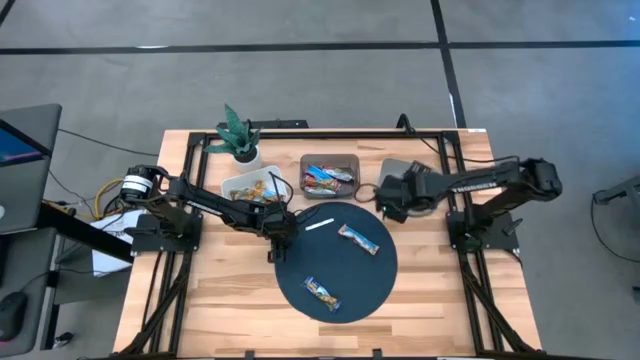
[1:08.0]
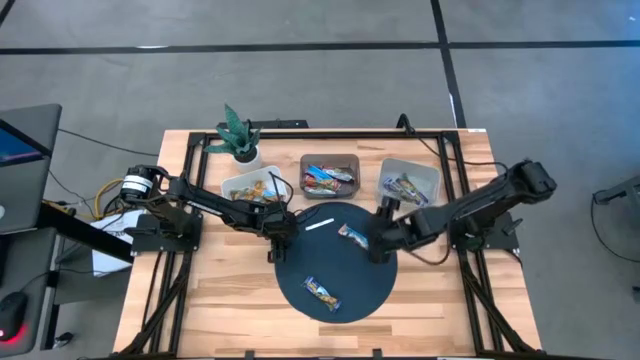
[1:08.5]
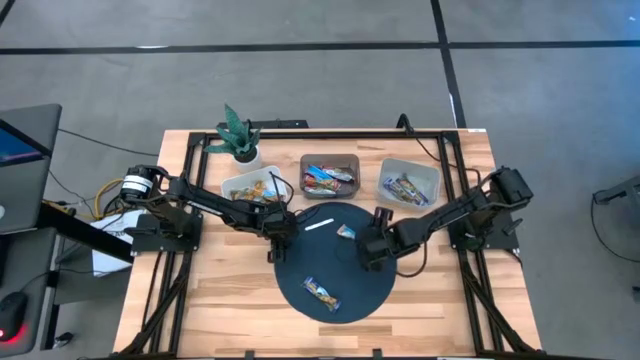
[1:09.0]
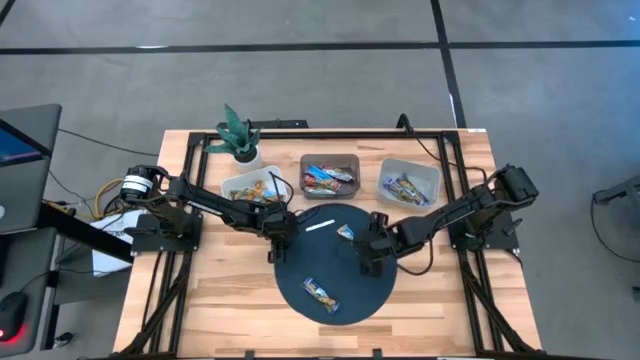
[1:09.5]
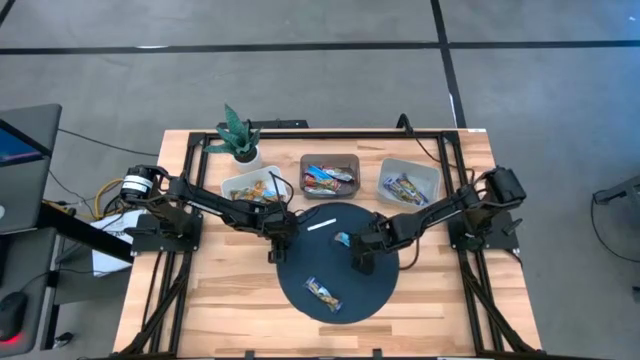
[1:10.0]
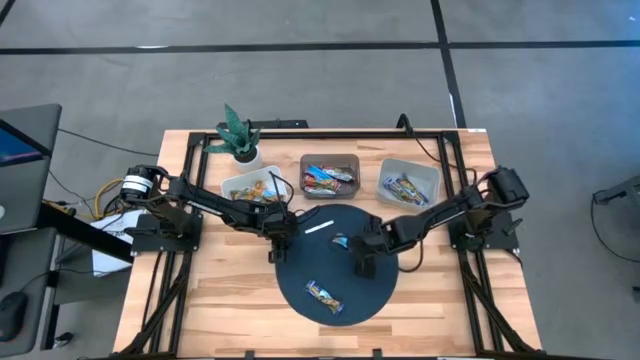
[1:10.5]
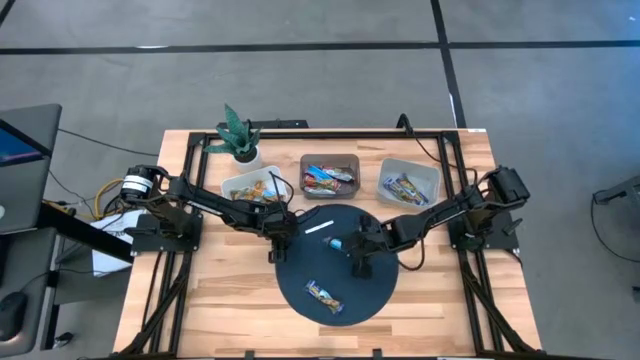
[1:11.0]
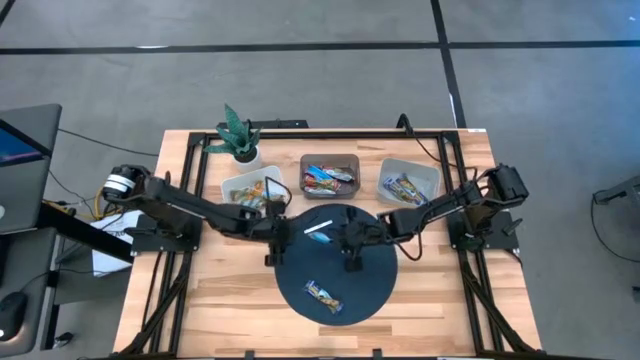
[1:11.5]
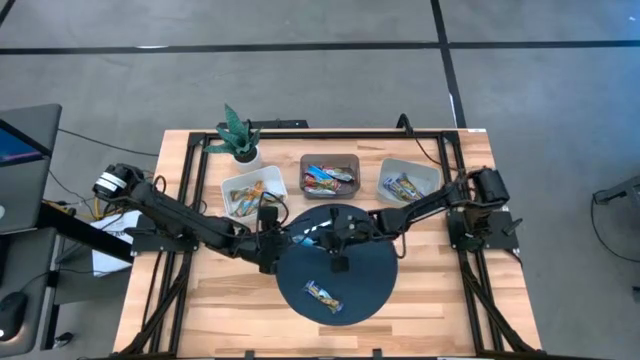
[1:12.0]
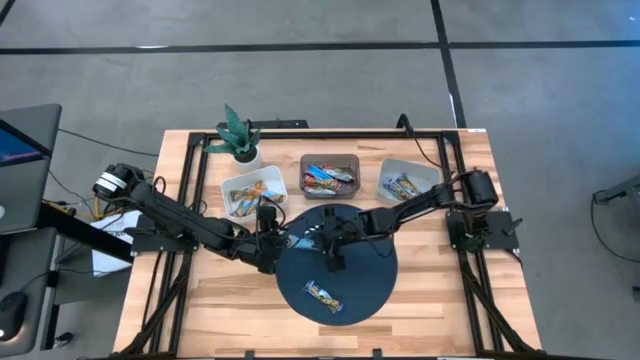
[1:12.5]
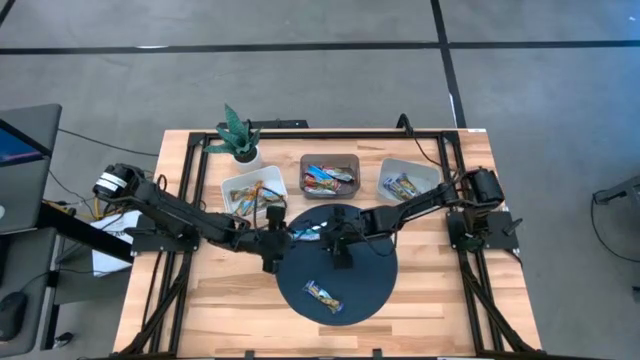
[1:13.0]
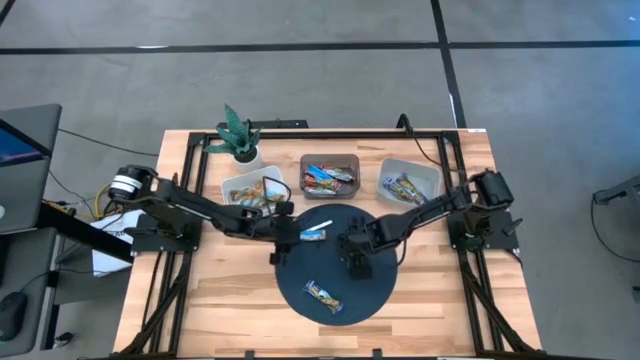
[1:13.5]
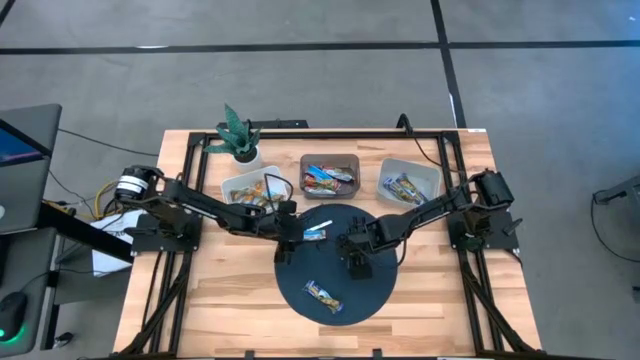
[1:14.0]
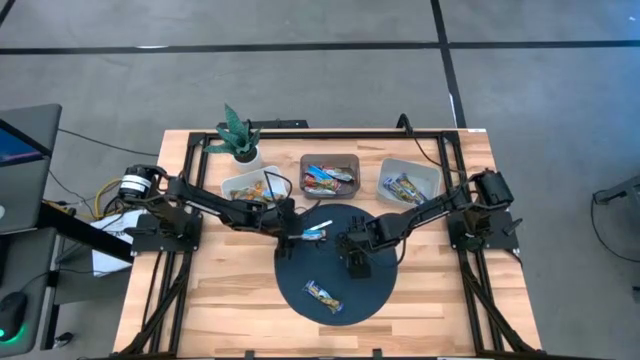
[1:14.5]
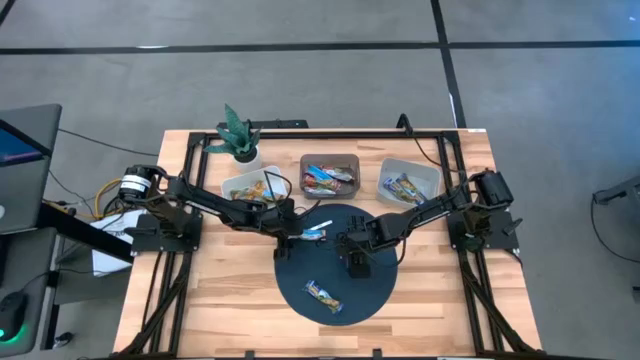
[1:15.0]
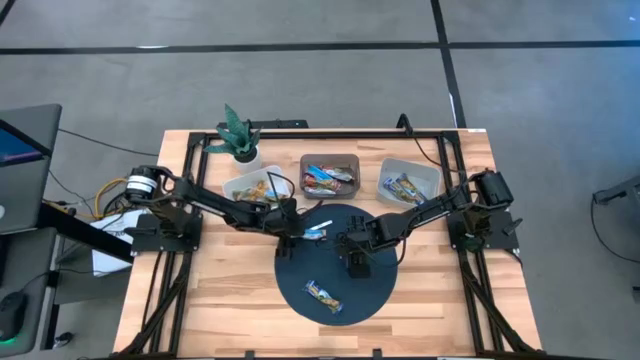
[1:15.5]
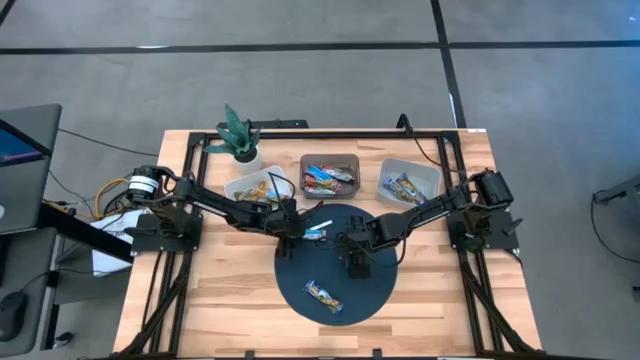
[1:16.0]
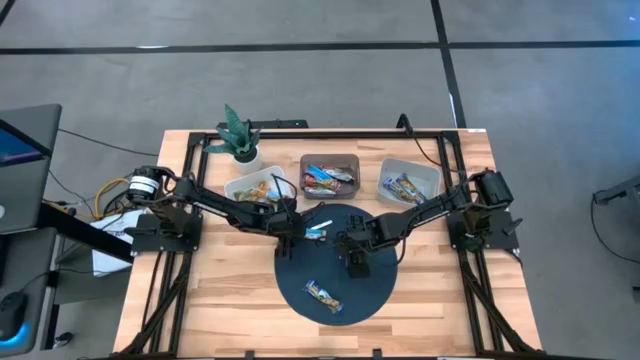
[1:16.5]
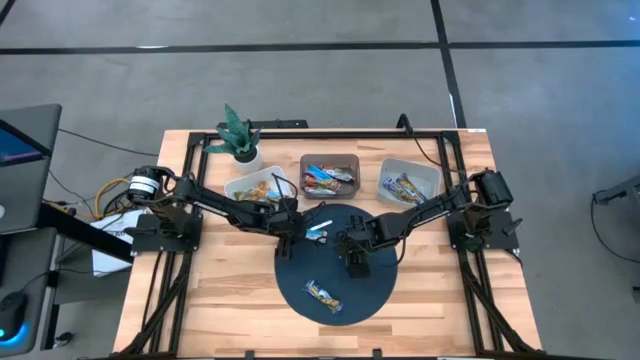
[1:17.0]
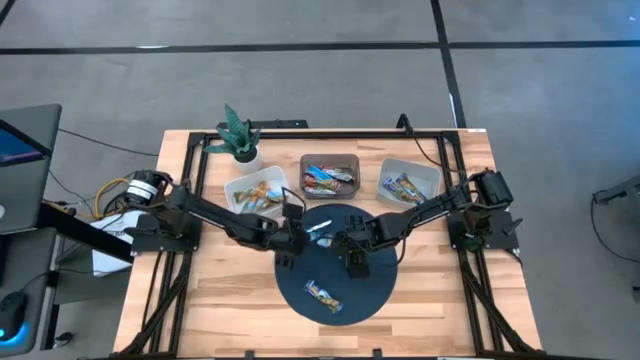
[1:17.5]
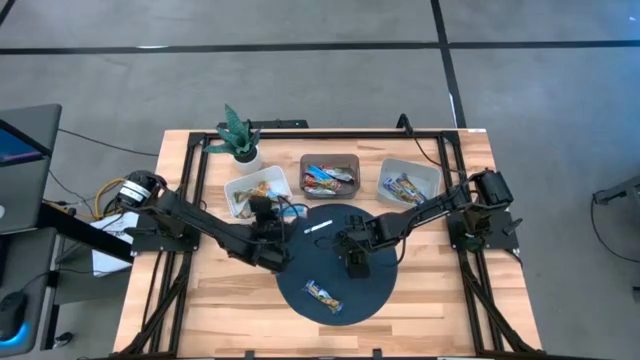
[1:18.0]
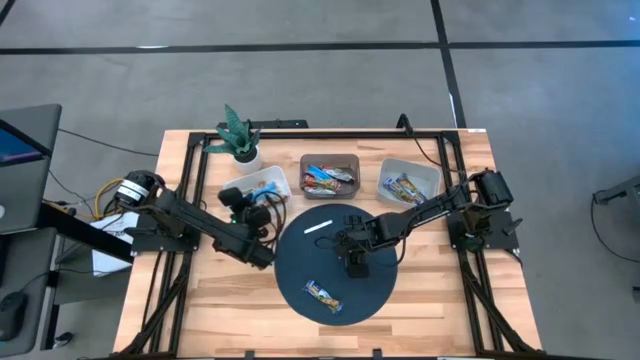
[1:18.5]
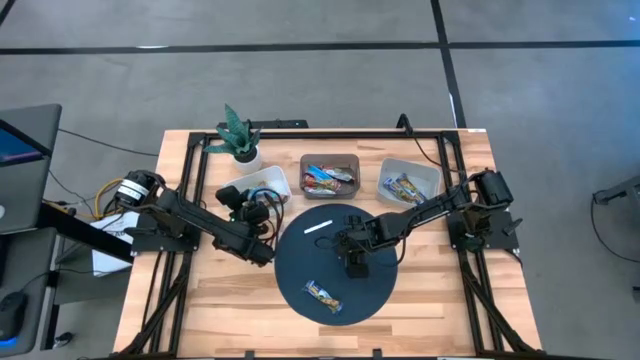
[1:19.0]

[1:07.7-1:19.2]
Task: Pick and place Granola Bars by type
Put the orange granola bar into the white bin

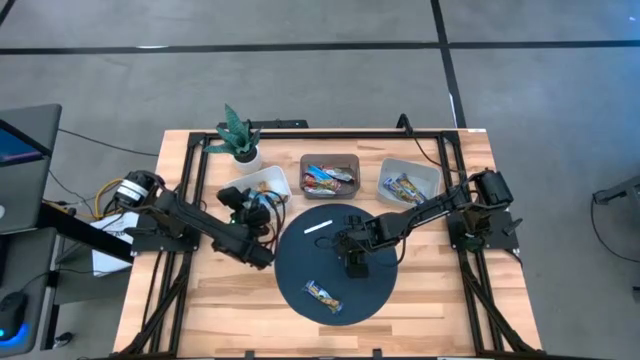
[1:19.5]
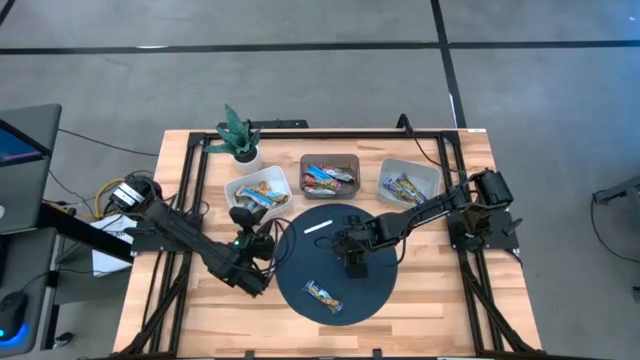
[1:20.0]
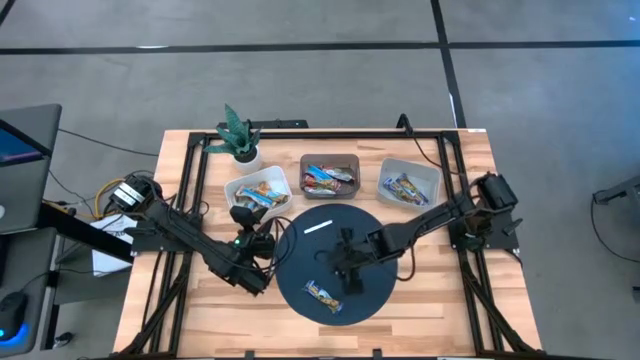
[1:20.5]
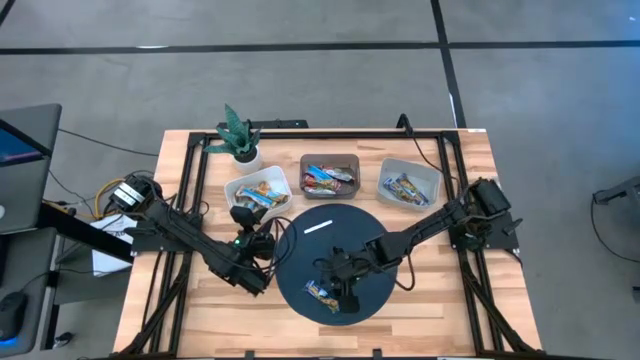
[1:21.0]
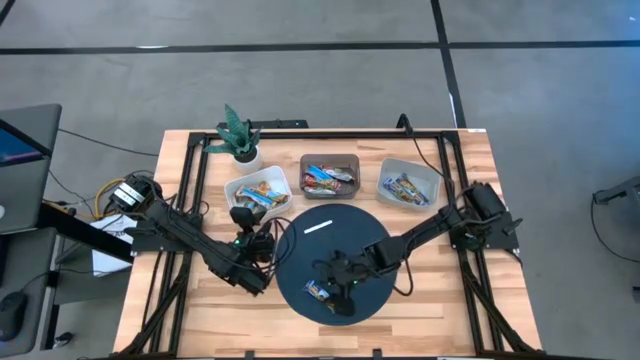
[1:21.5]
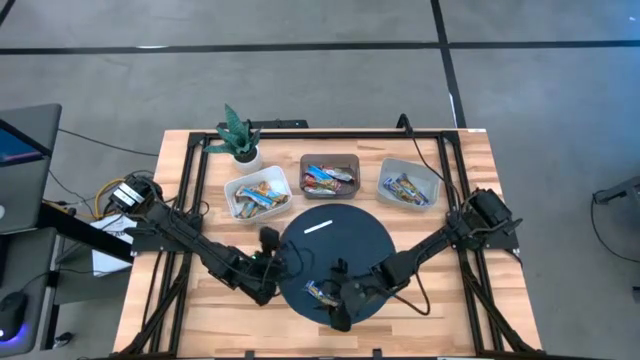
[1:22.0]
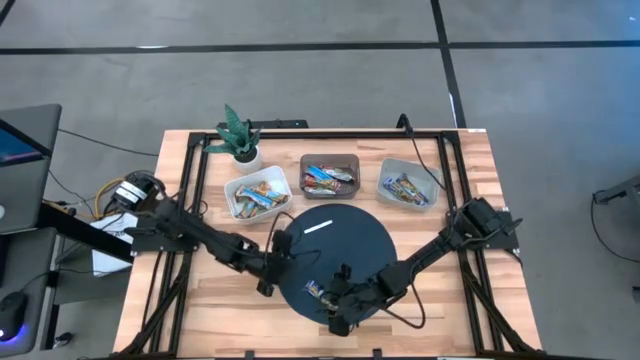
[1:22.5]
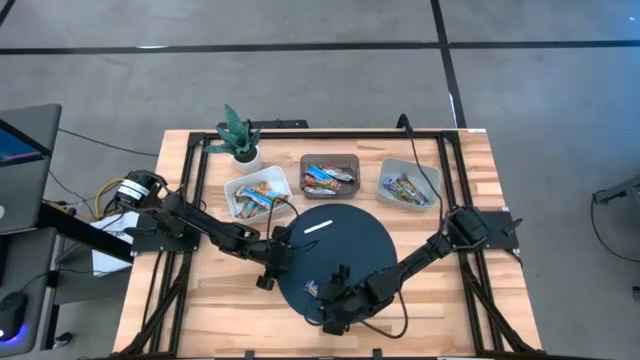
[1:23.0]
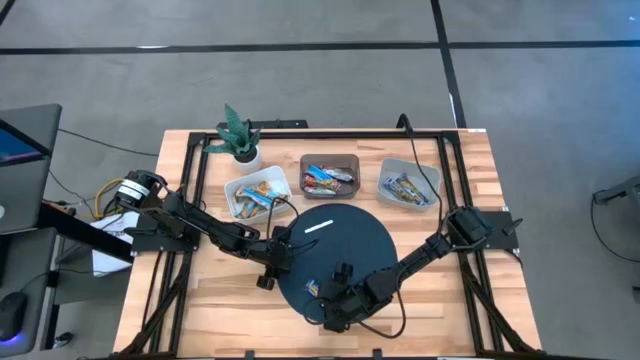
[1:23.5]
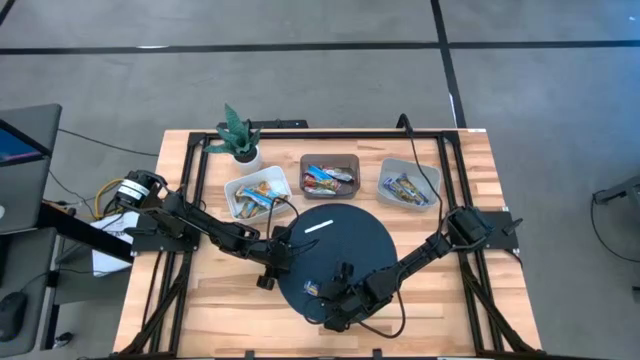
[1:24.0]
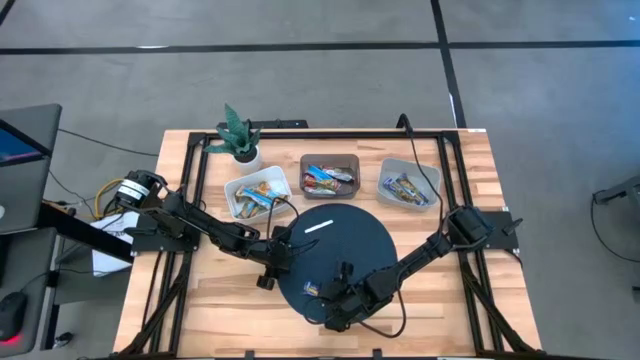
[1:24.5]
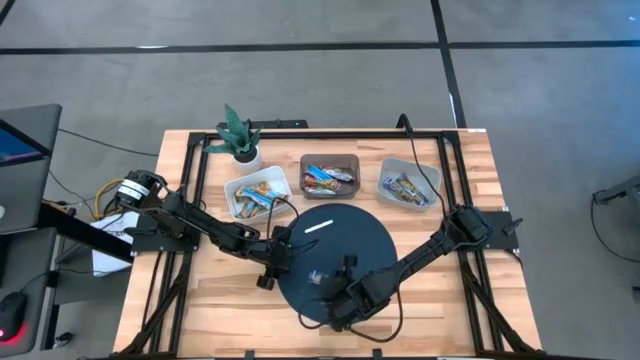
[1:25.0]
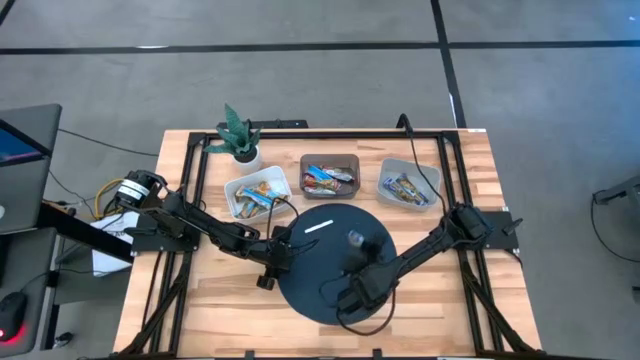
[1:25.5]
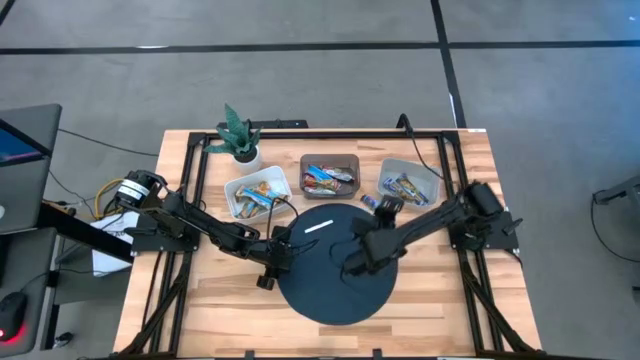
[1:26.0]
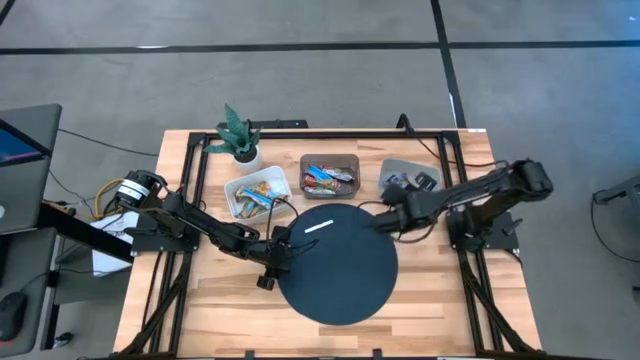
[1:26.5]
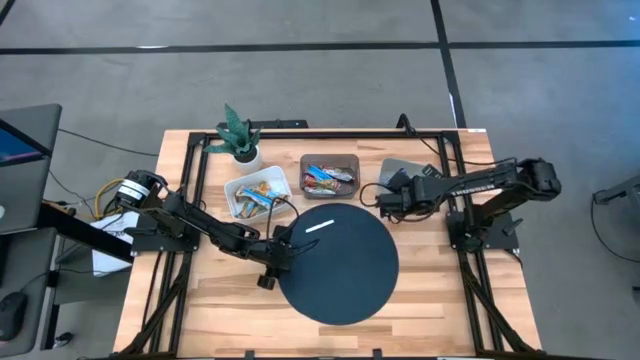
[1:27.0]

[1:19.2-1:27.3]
Put the purple granola bar into the gray bin

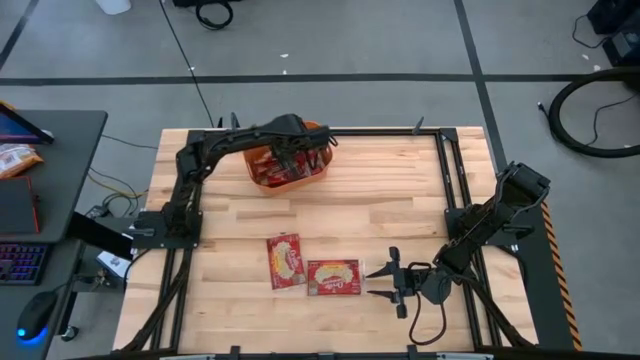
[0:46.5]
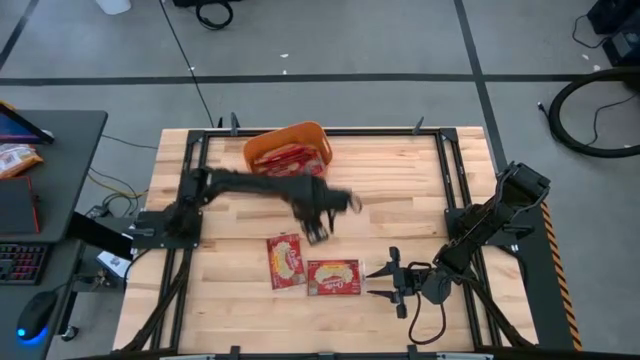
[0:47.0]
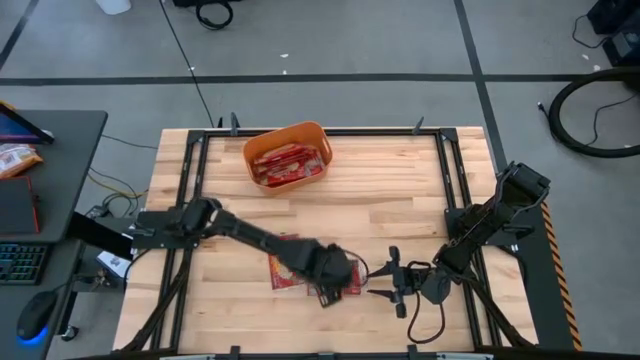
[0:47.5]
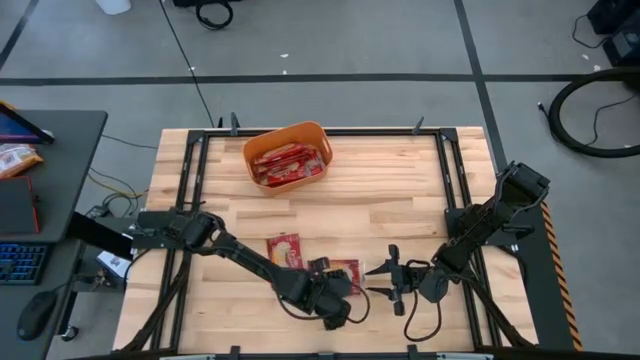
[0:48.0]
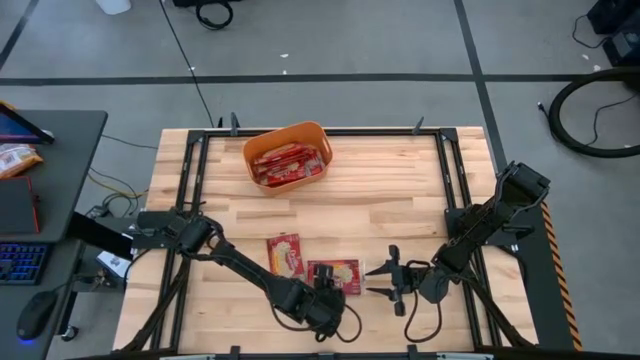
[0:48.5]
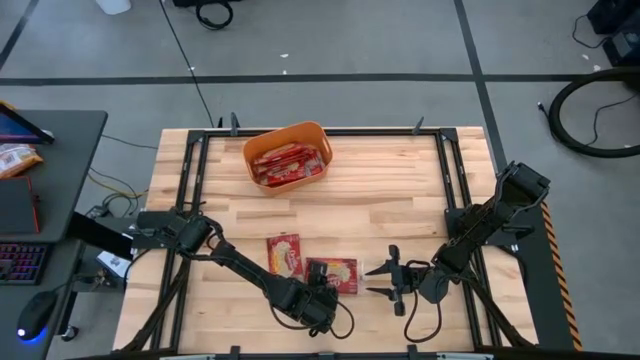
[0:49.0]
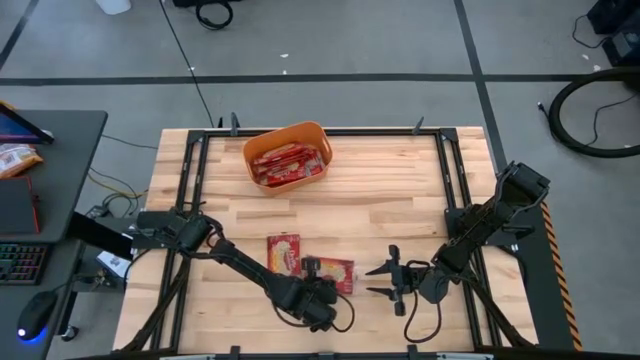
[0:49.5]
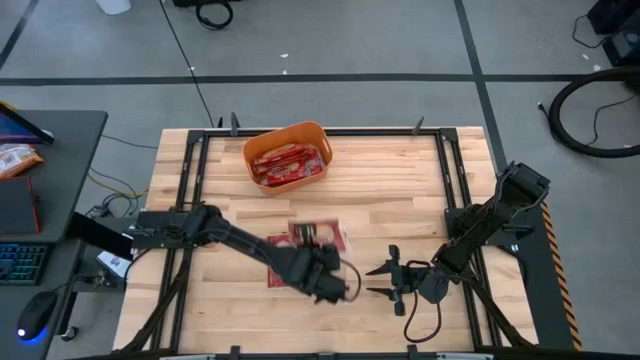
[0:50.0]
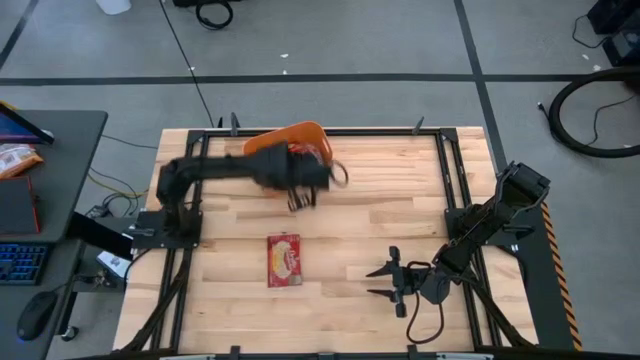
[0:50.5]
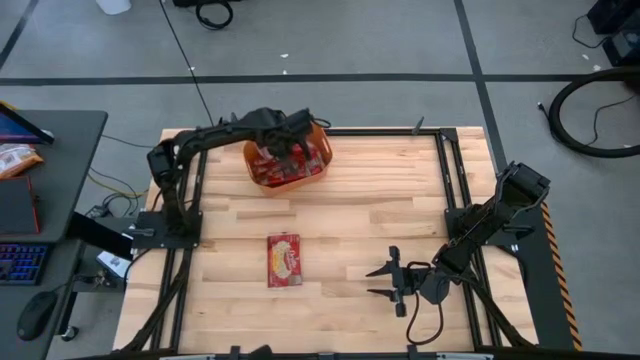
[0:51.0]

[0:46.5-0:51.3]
Task: Sort popcorn bags into baskets
Put the red popcorn bag into the orange bin
